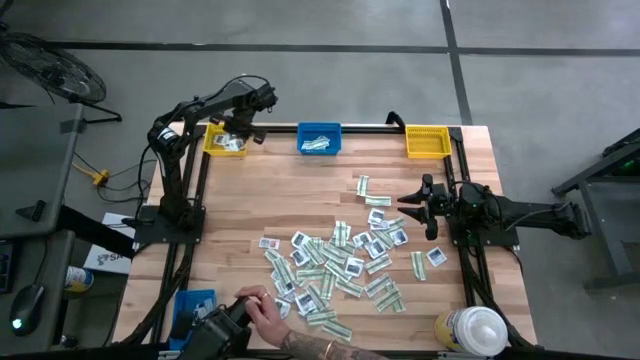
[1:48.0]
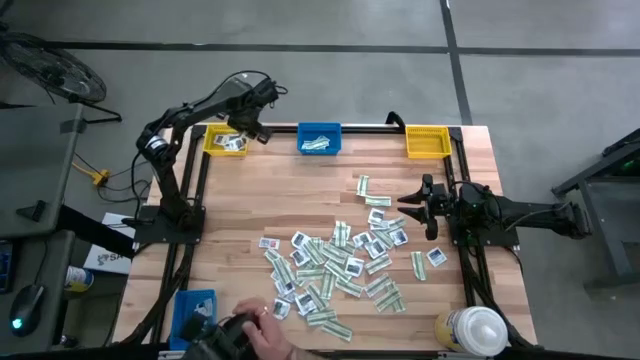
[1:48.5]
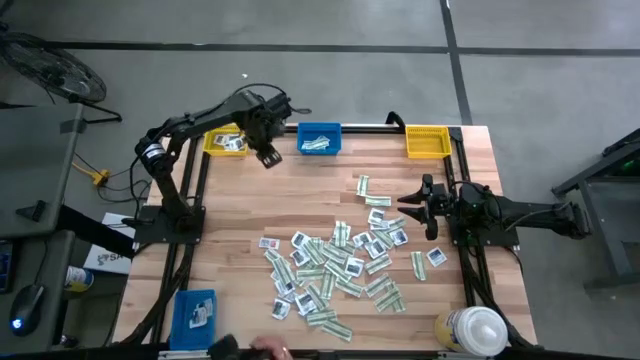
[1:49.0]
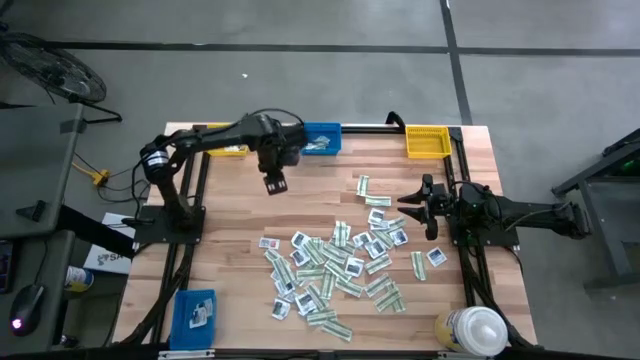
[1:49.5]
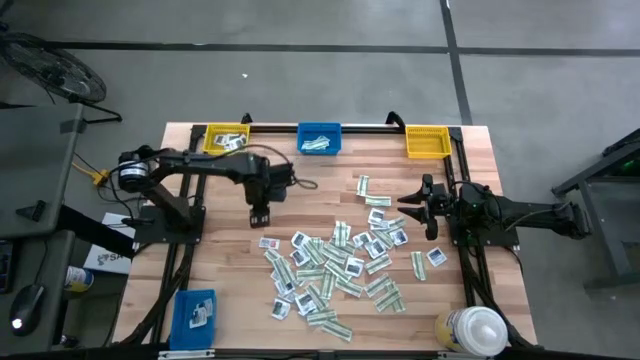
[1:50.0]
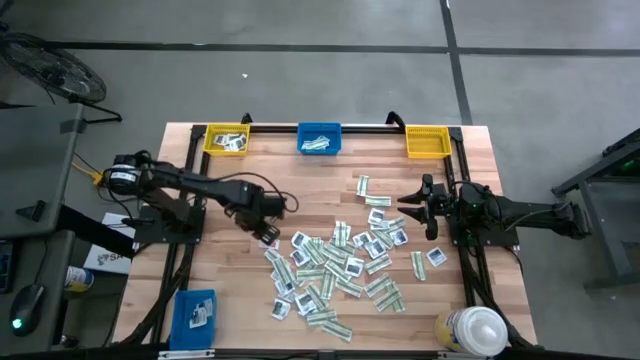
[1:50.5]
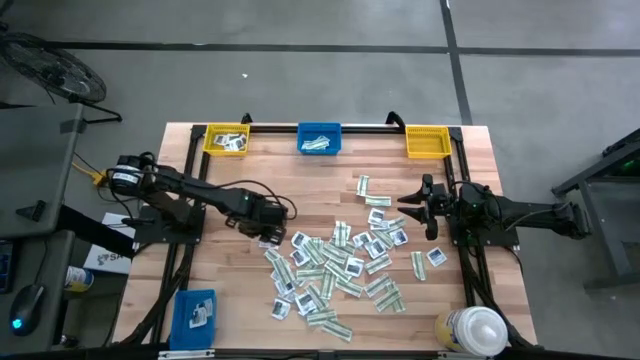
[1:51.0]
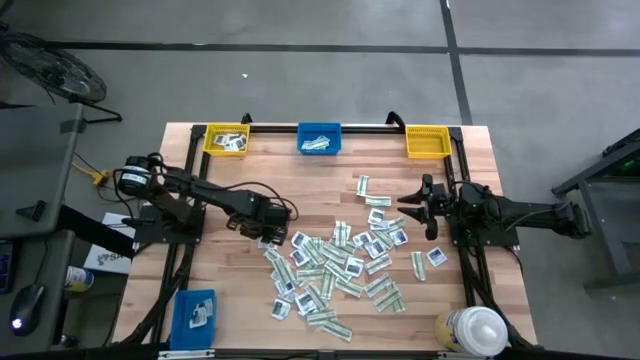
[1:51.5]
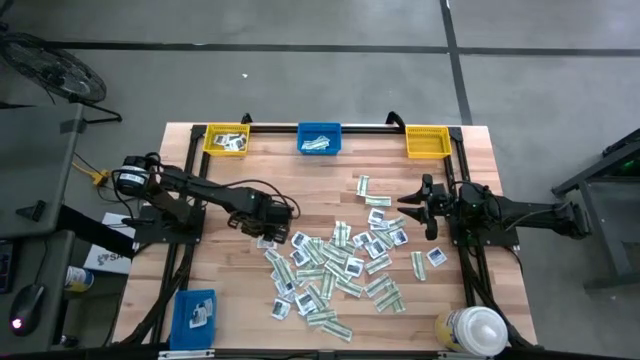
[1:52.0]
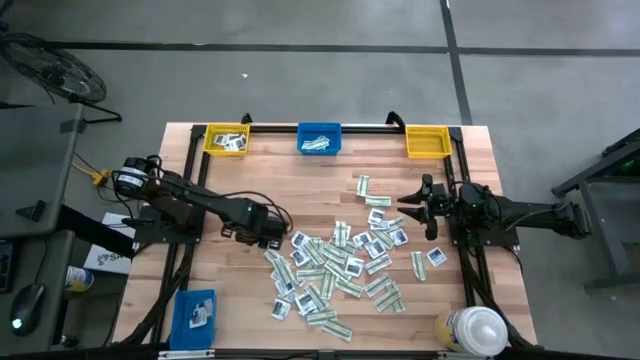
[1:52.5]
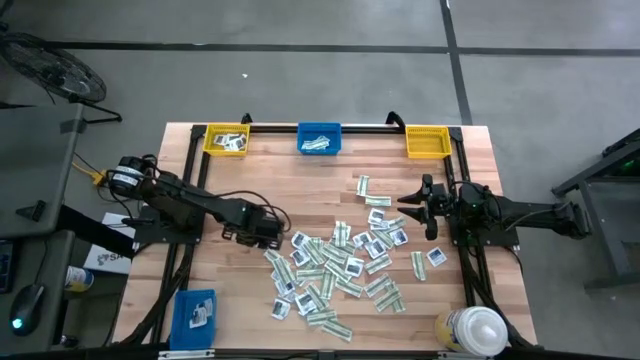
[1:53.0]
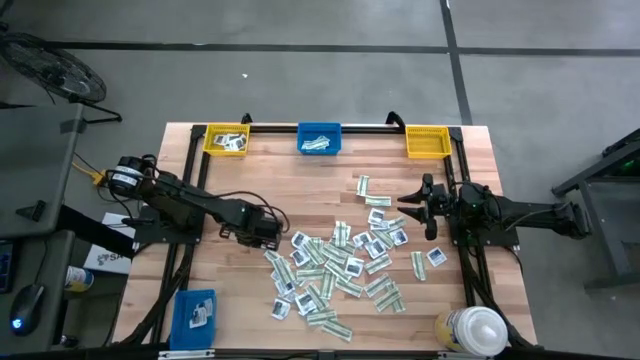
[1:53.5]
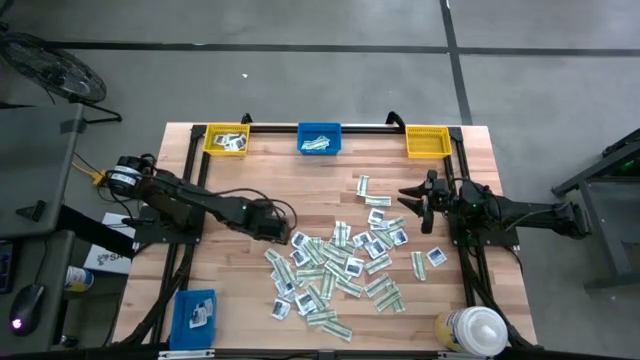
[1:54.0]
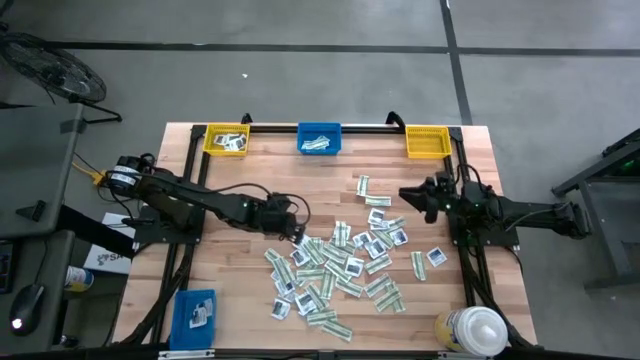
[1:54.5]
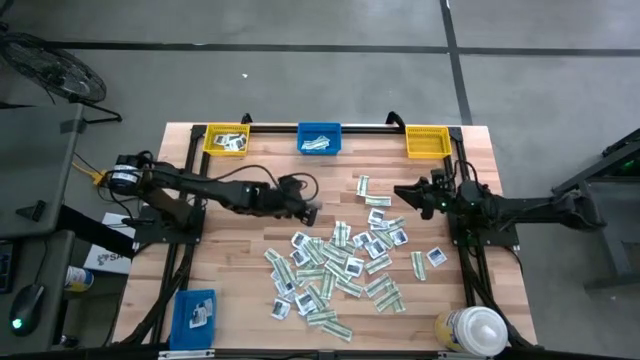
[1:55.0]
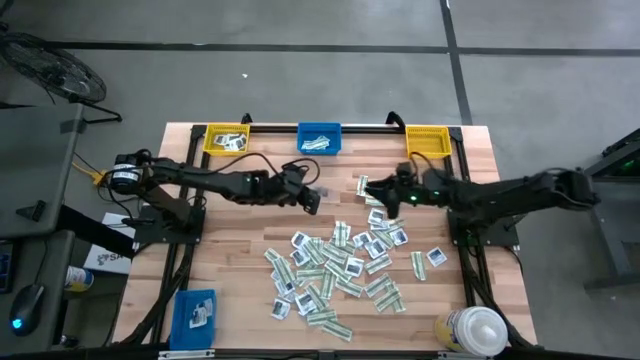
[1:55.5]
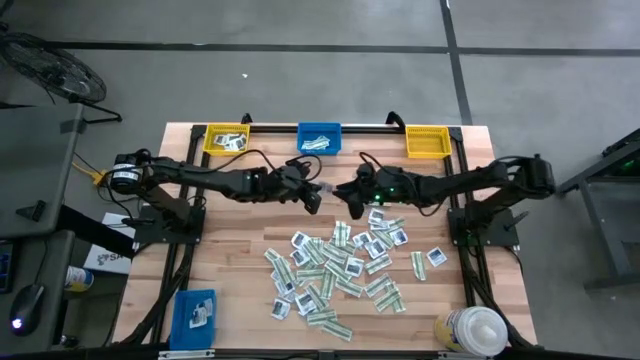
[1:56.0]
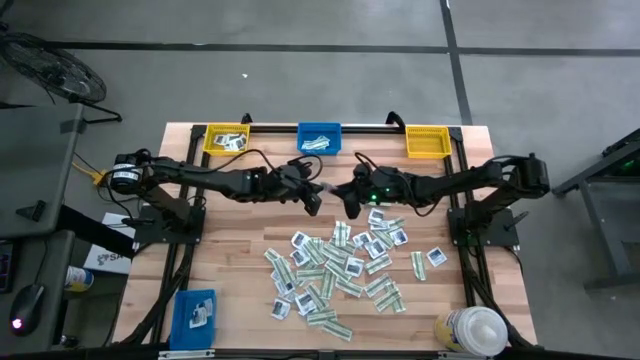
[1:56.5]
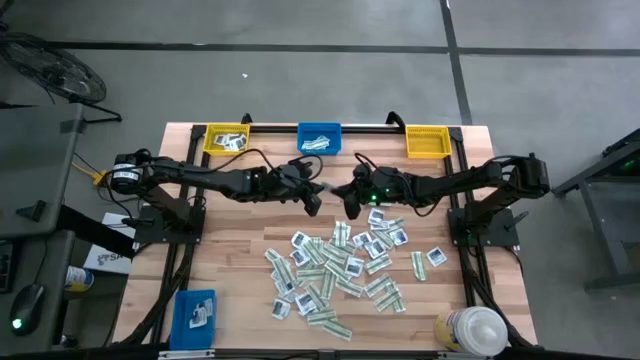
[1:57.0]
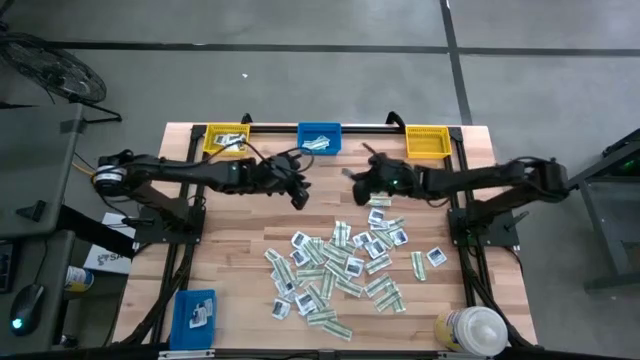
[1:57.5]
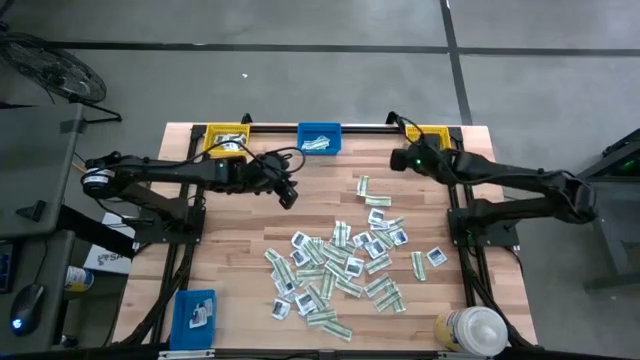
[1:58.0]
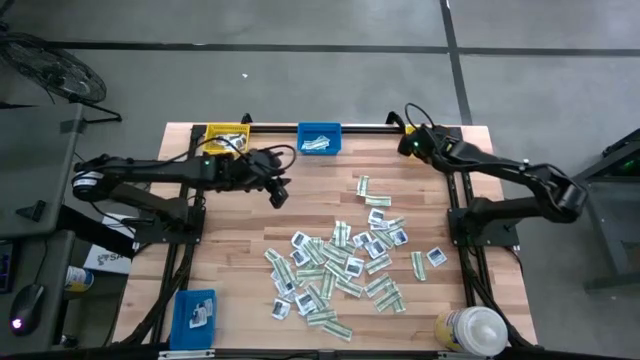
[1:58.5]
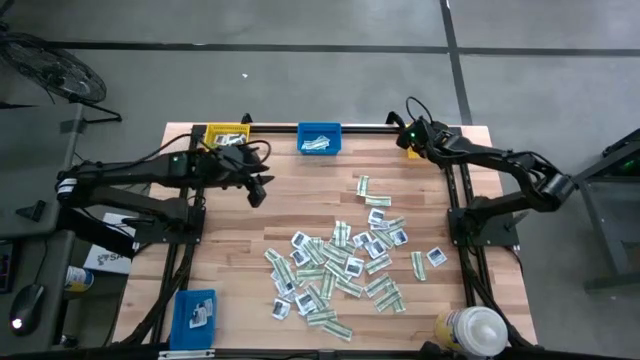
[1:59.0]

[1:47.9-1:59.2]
Task: Pick & Place First Aid Supplies
Put the orange ointment pack into the right yellow bin

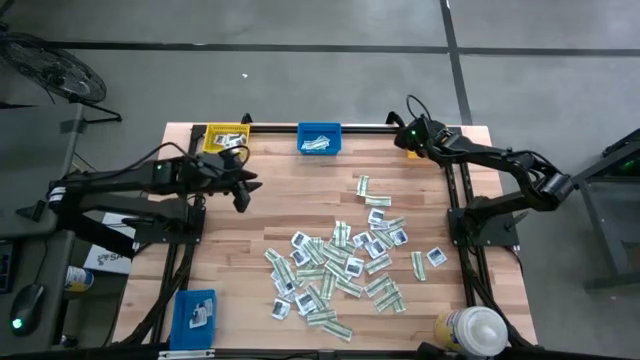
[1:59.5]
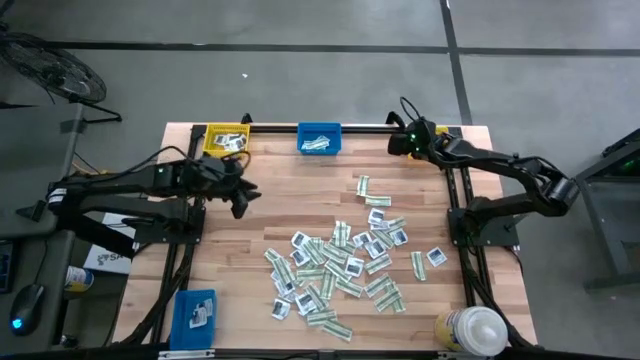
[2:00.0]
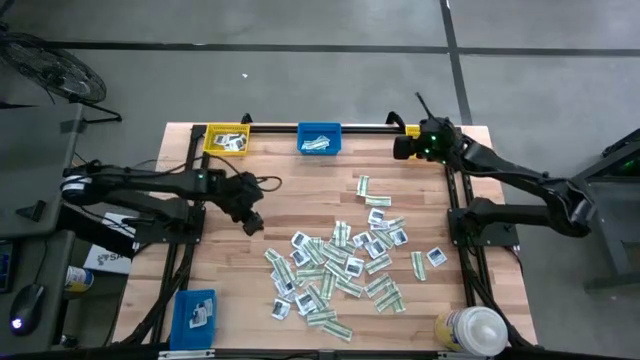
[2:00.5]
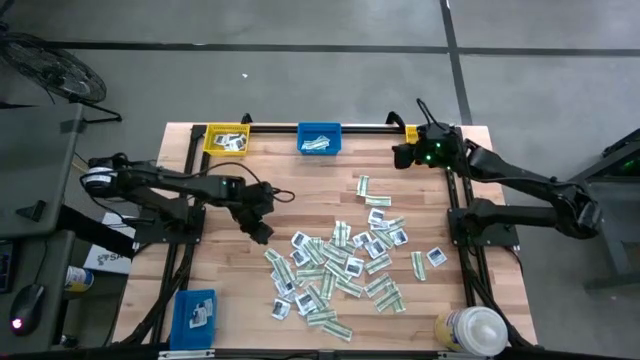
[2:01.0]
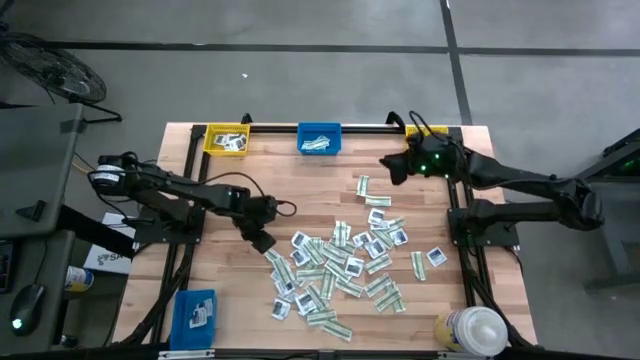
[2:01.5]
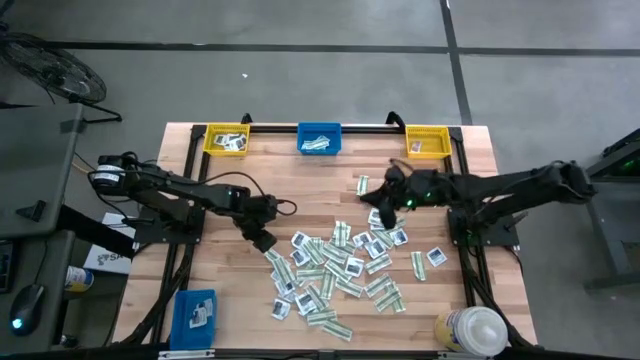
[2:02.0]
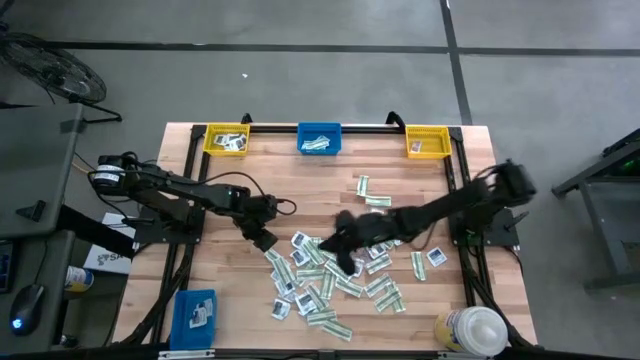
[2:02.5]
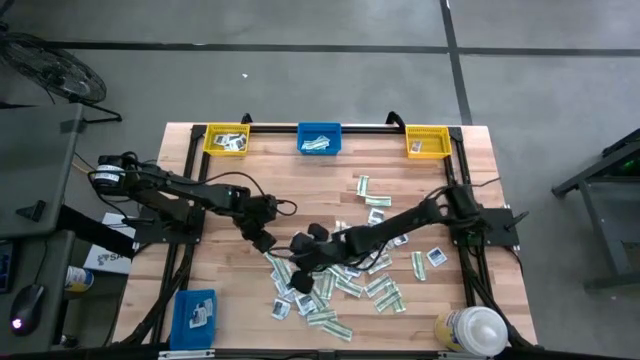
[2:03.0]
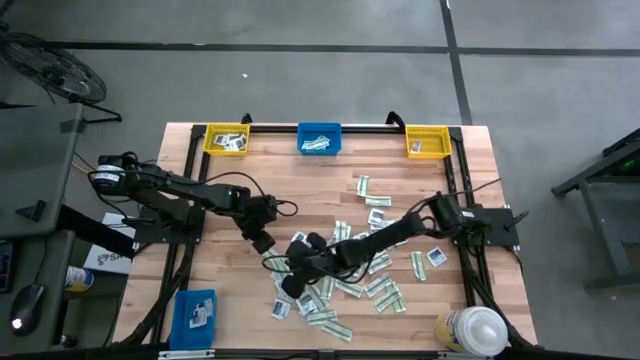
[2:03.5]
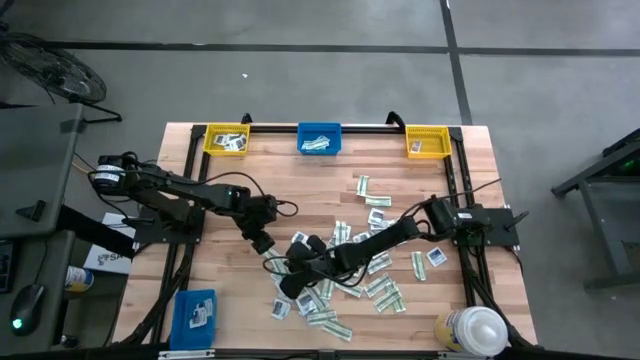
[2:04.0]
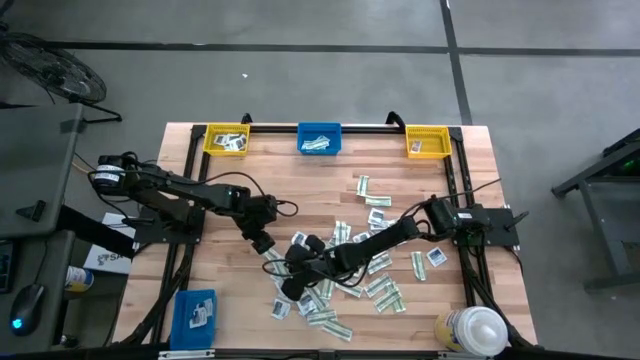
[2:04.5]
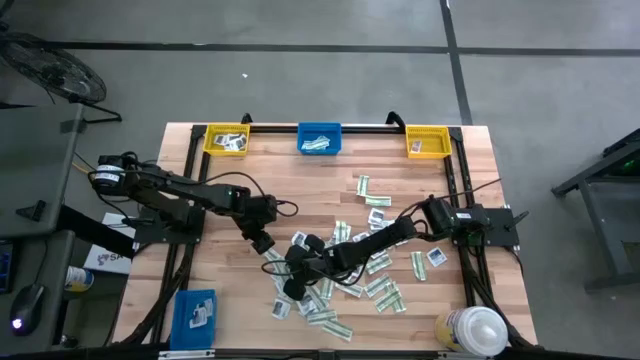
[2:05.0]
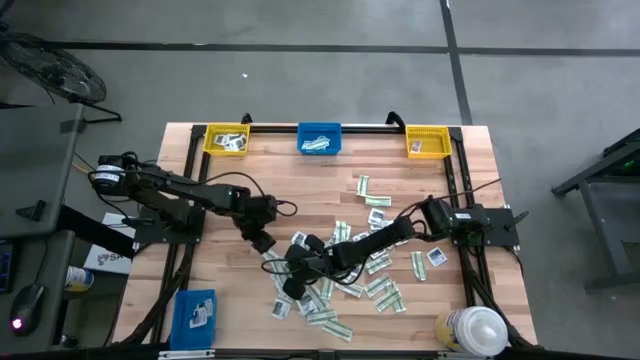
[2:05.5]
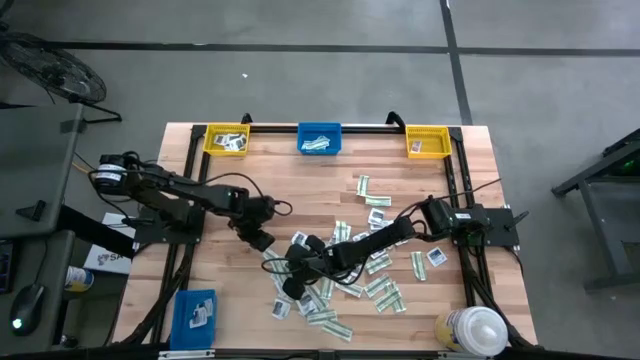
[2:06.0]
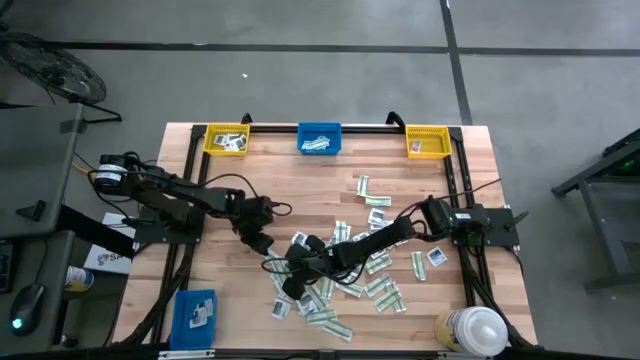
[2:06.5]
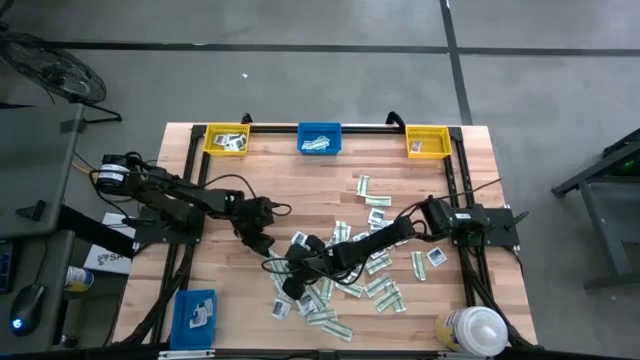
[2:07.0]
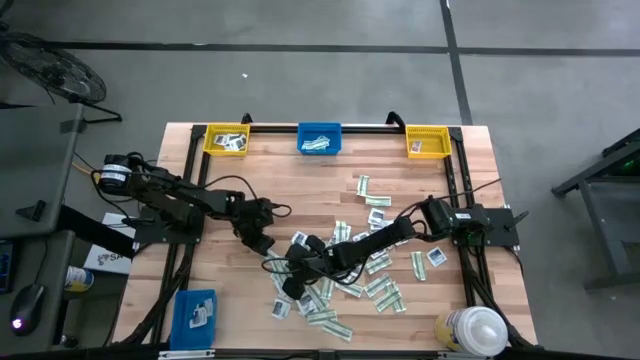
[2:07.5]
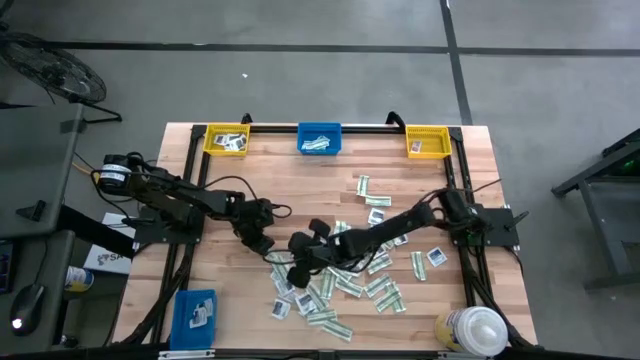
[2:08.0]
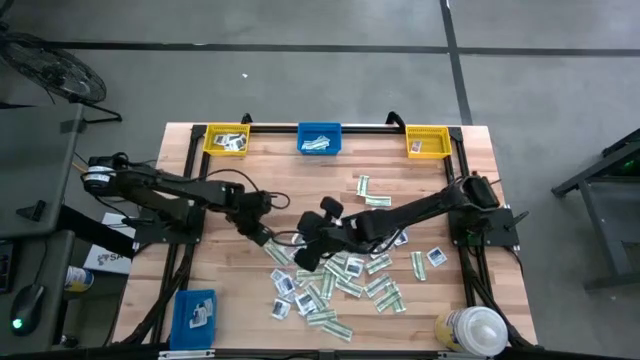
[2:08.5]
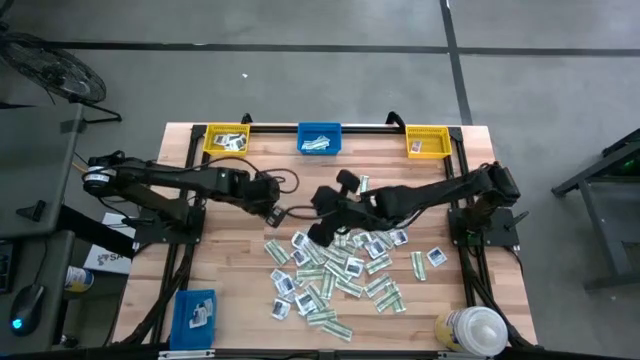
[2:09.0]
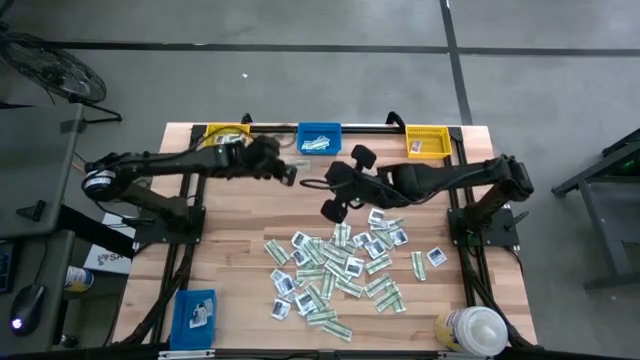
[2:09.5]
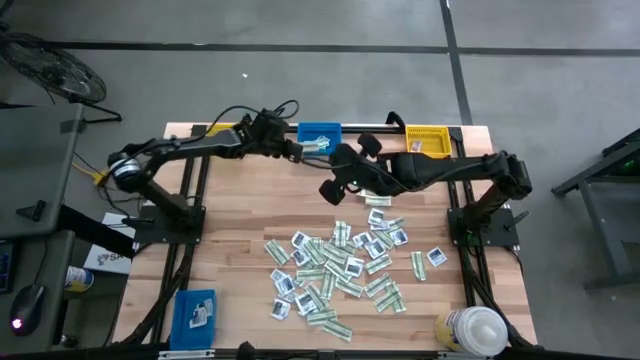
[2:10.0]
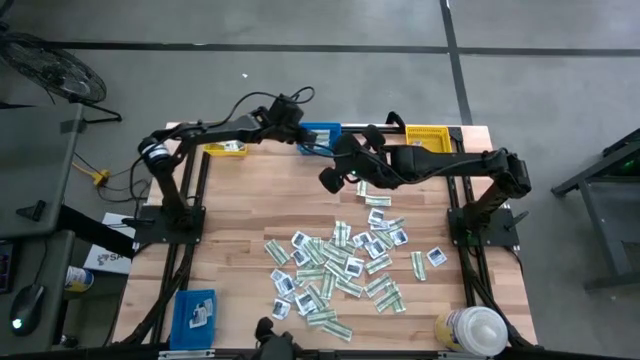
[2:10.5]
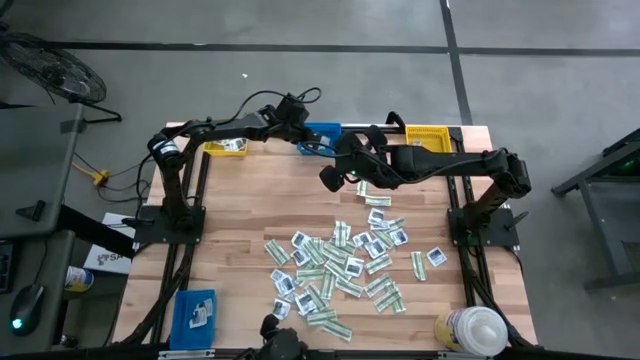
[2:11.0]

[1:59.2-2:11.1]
Put the green bandage pack into the top blue bin
